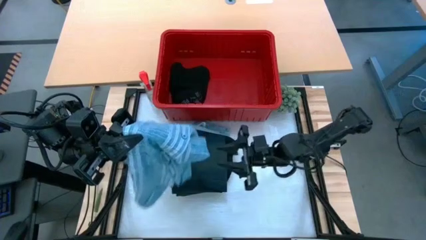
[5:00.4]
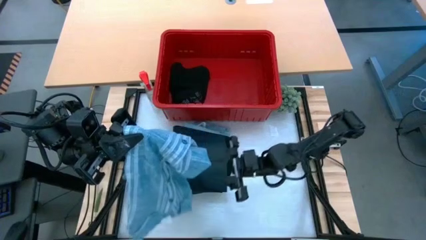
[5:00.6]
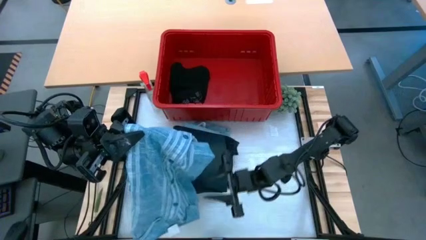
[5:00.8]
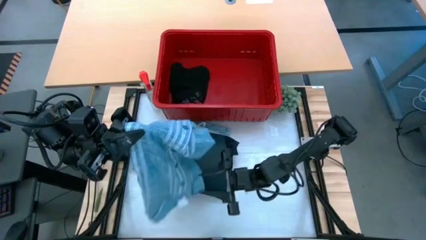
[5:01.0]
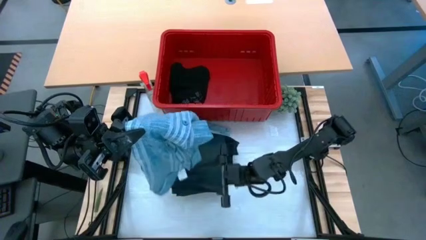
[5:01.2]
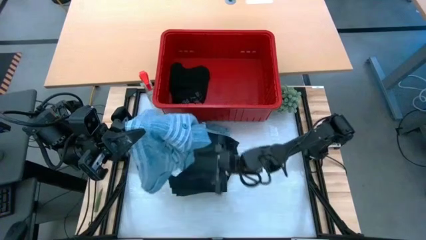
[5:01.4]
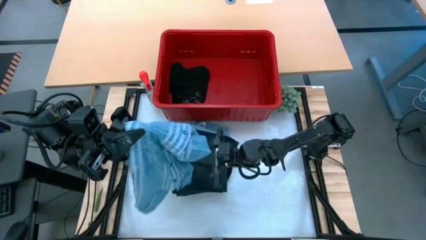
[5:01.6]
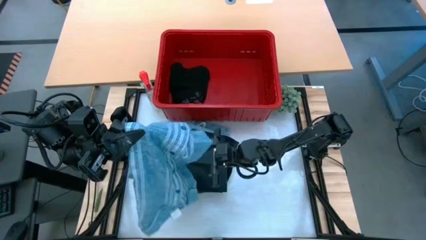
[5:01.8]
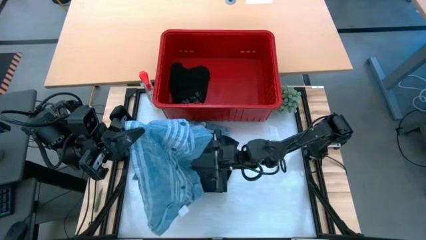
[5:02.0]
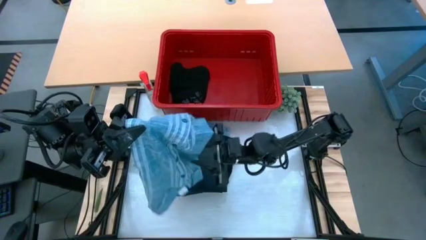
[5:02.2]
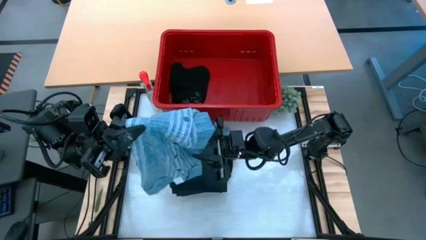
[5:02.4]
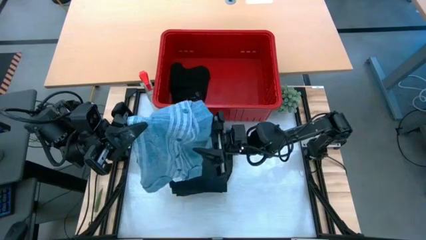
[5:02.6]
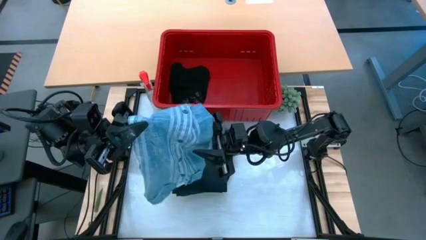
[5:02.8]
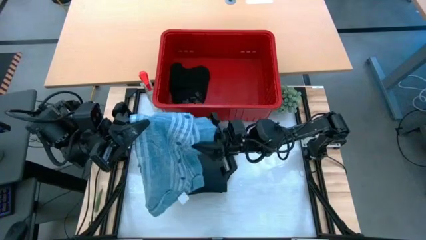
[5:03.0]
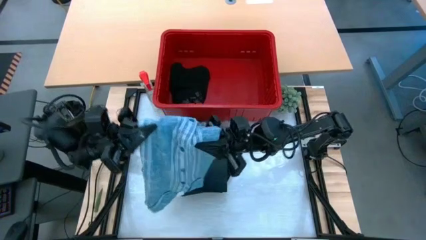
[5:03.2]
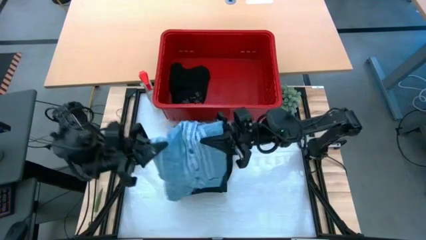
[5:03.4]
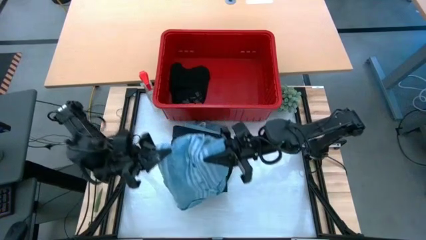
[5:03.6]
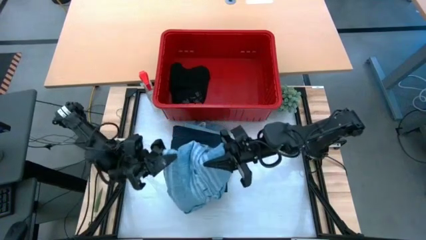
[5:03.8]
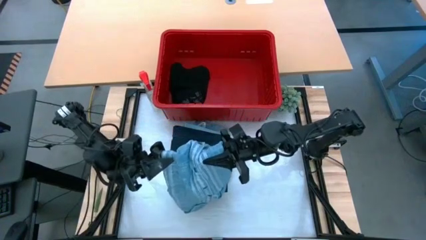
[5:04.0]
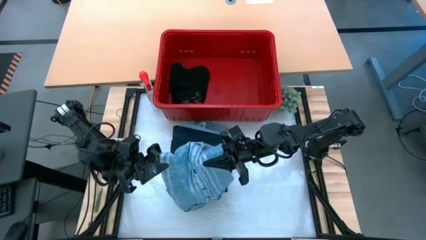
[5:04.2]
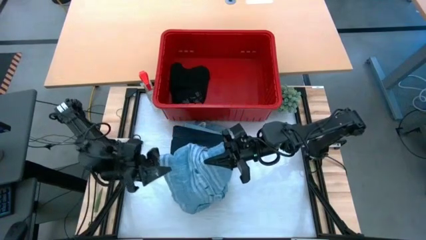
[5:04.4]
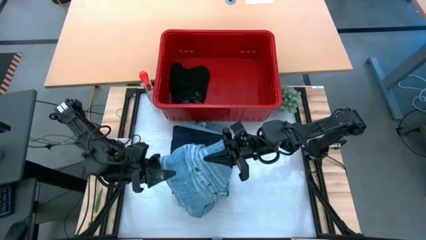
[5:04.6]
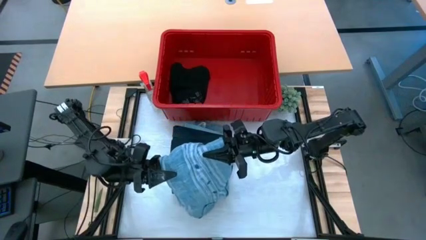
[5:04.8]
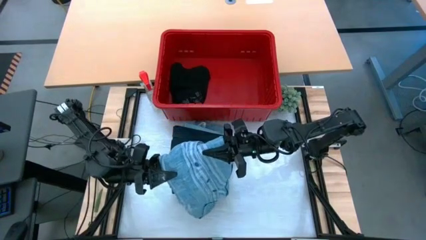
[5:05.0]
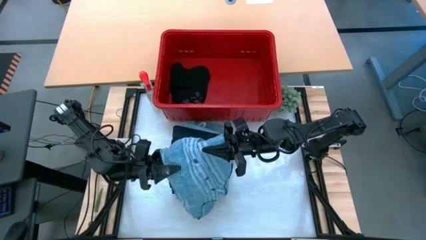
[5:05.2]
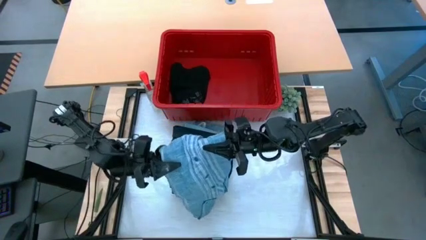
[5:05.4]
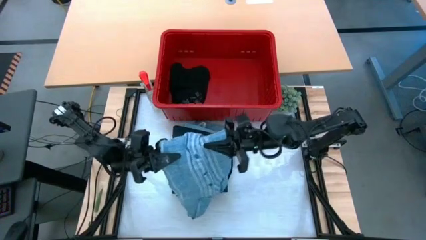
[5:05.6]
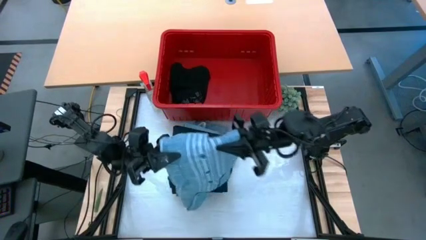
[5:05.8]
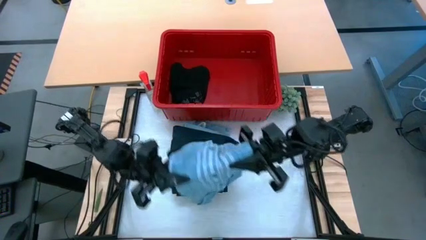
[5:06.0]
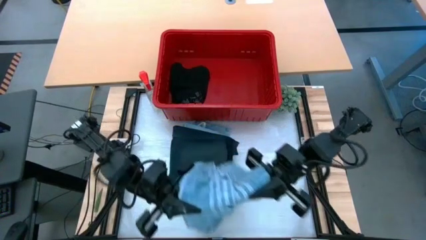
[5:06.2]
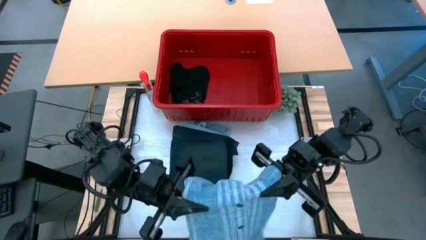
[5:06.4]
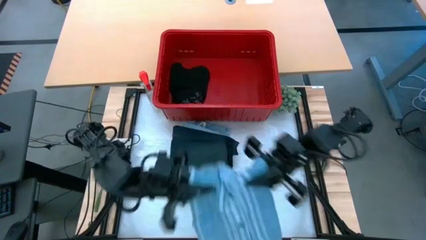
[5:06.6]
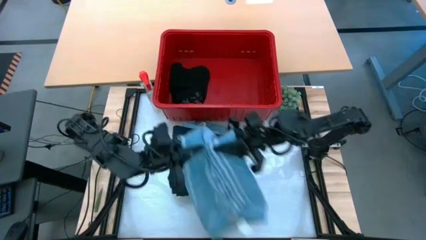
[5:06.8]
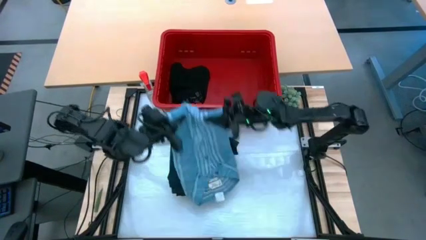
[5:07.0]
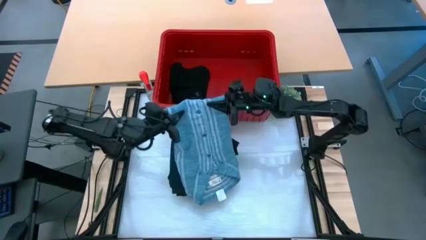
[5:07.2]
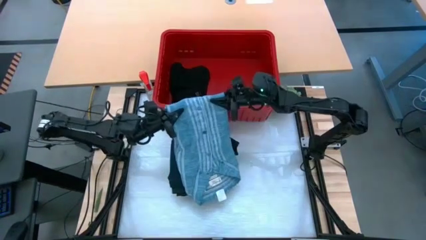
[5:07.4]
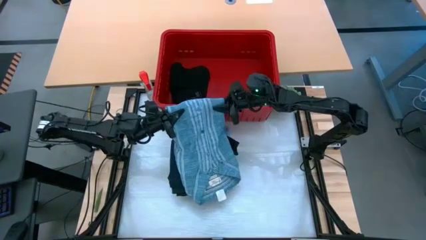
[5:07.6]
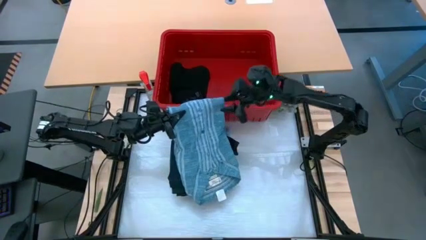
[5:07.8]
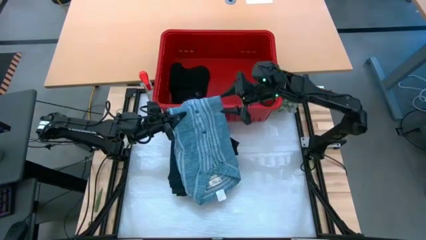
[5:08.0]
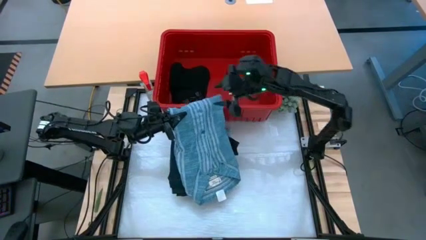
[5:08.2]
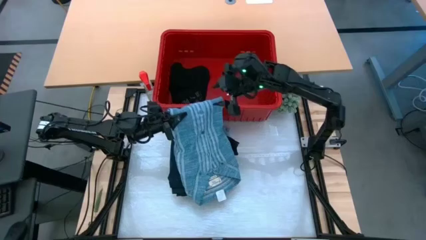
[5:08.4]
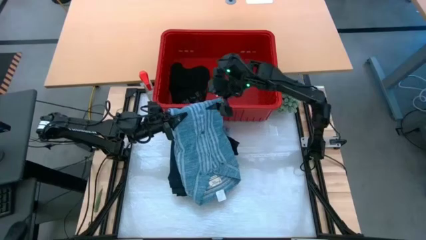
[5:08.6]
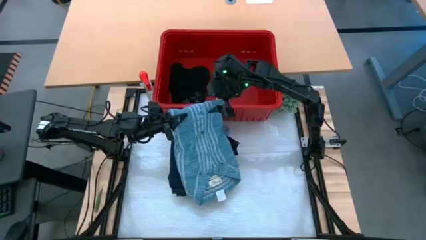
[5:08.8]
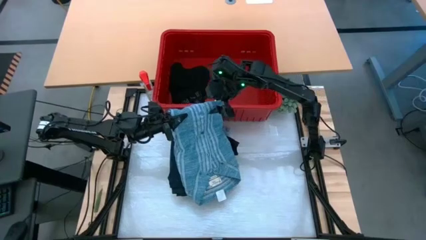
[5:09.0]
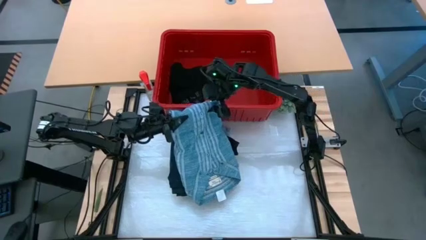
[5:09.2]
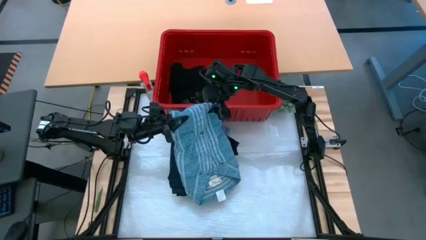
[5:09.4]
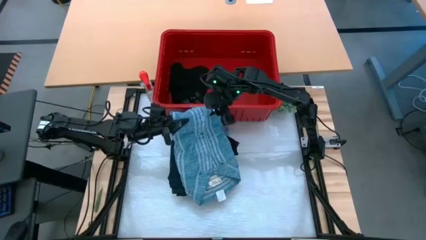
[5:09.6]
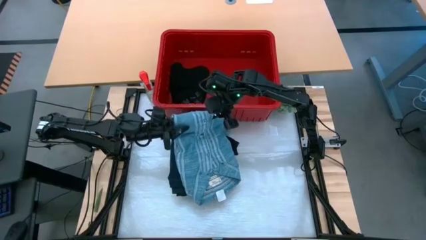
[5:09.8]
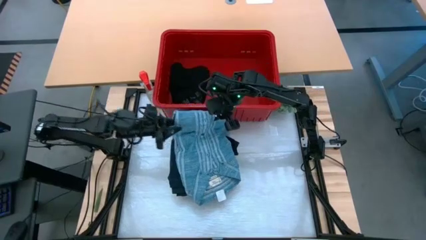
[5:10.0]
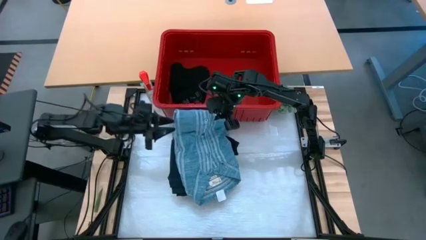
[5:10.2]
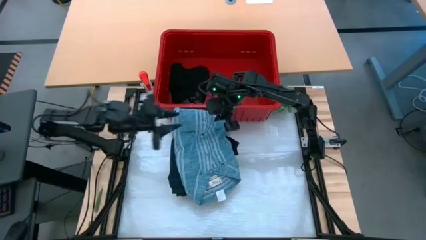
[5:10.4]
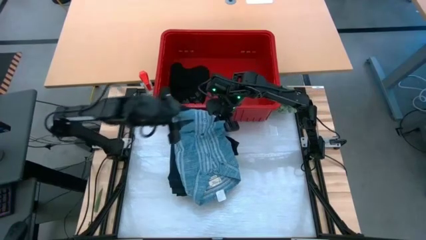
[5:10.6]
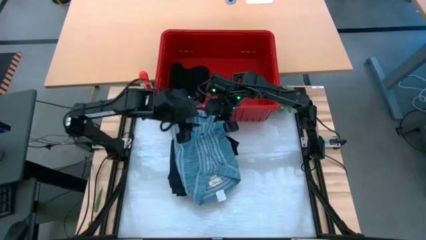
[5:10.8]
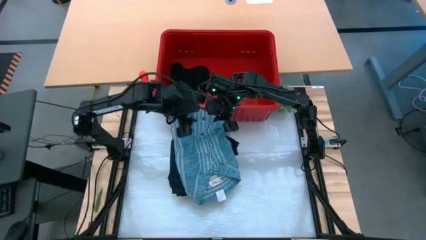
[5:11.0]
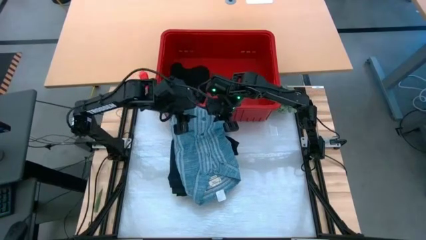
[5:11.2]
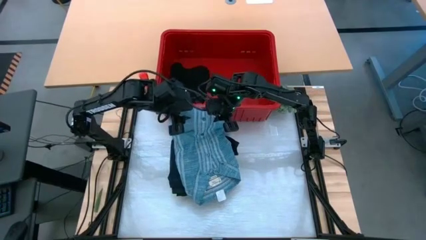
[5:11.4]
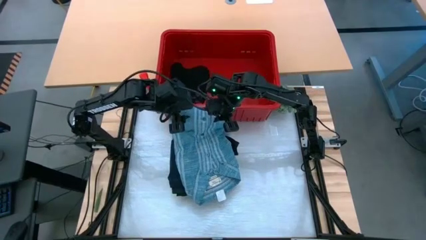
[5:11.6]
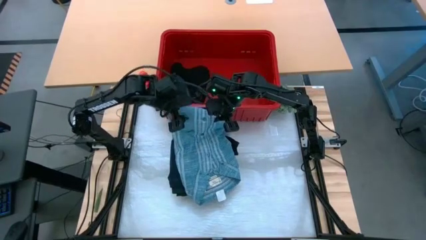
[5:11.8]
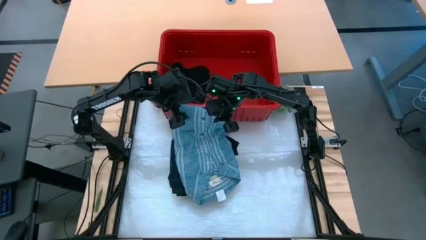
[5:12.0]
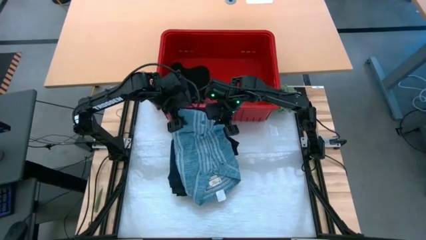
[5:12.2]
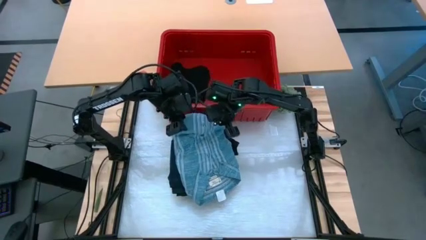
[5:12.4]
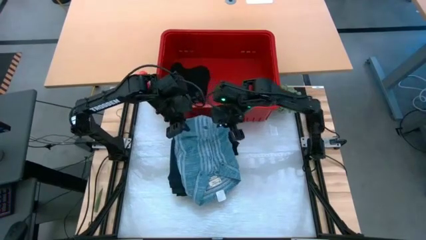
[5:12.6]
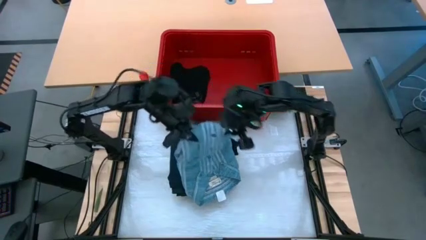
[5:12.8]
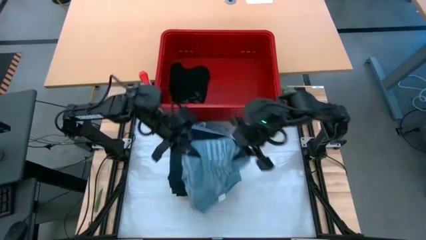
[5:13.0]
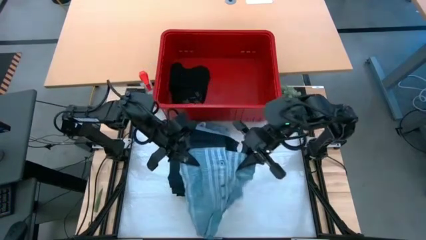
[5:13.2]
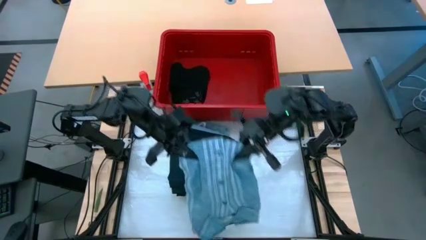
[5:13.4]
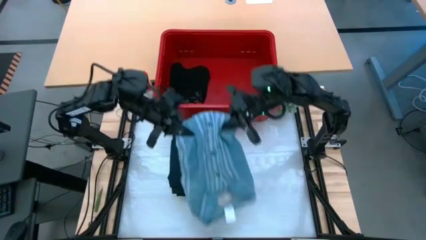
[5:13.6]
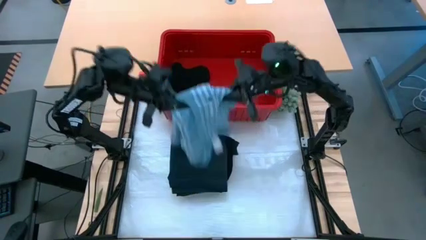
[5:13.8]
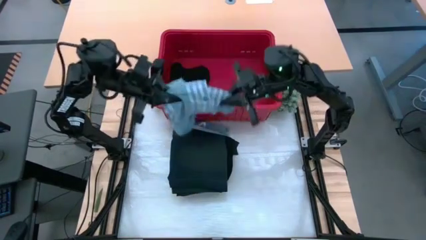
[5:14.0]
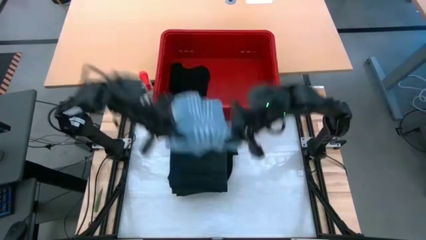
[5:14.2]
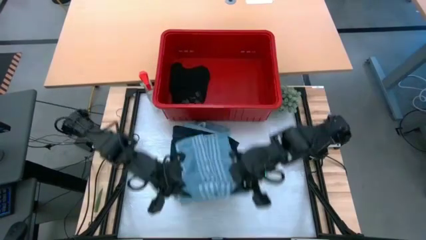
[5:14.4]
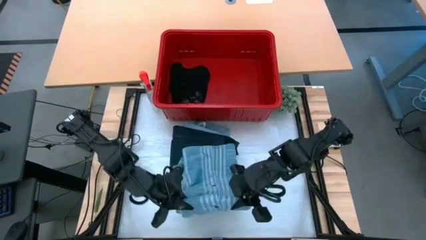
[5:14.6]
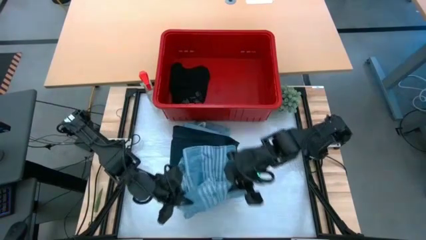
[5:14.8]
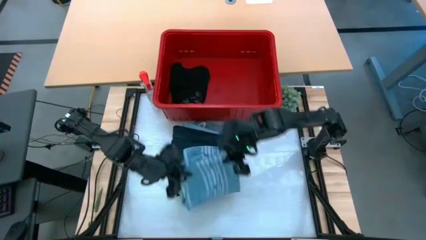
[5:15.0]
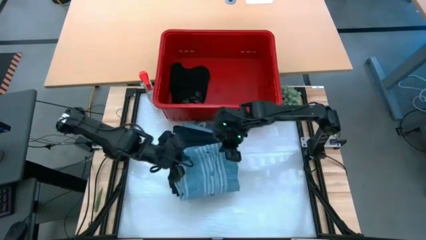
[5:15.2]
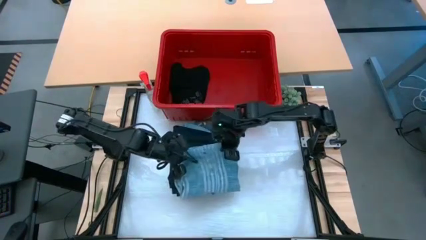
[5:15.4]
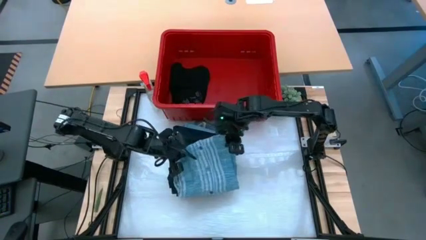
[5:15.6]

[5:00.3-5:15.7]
Task: Fold Laundry from Bin
Fold the blue and white patterned shirt

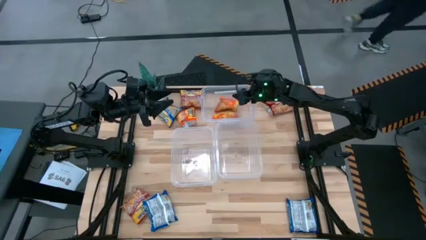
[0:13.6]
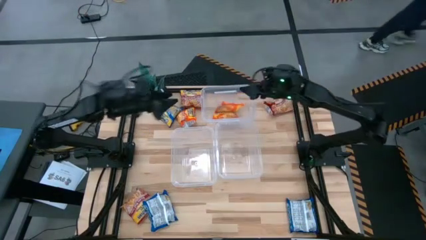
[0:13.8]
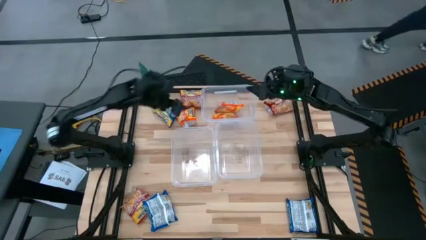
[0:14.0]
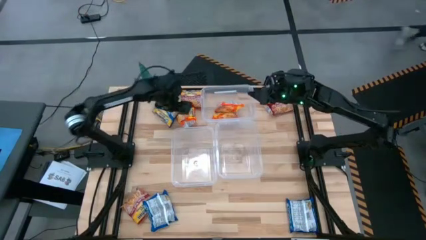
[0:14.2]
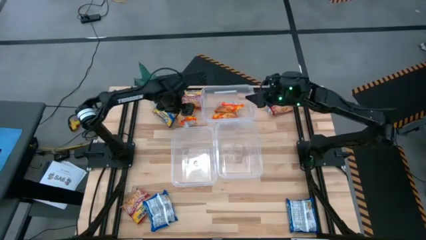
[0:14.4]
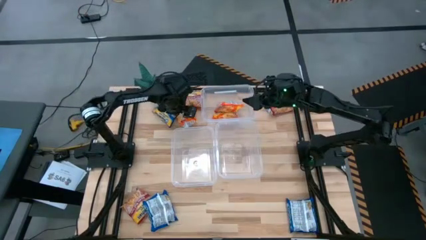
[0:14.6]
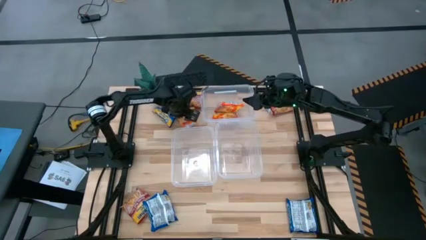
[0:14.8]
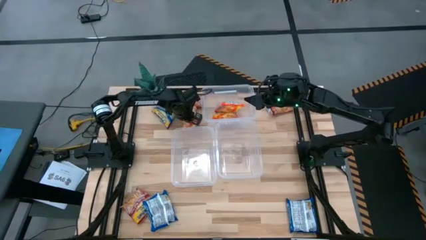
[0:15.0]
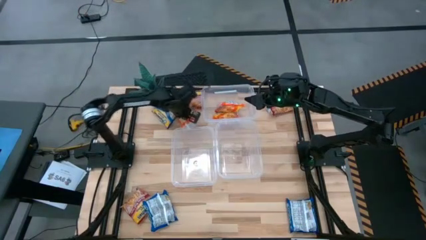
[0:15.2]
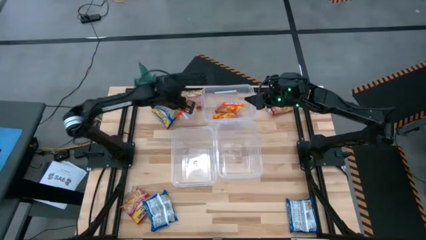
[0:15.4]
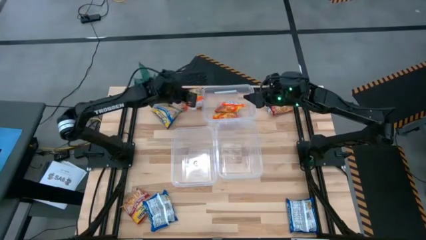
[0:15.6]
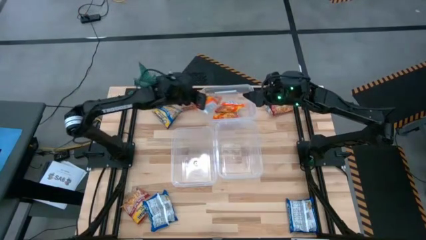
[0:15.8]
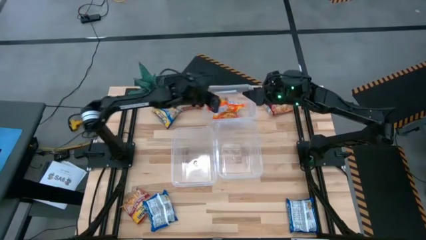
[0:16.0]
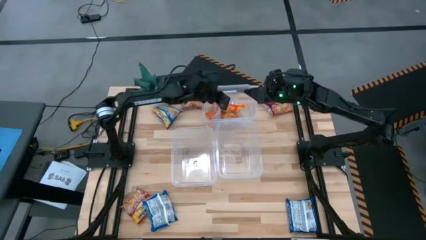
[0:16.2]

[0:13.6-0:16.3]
Task: Sort Maruchan noodles
Put the orange noodle pack into the top transparent bin
